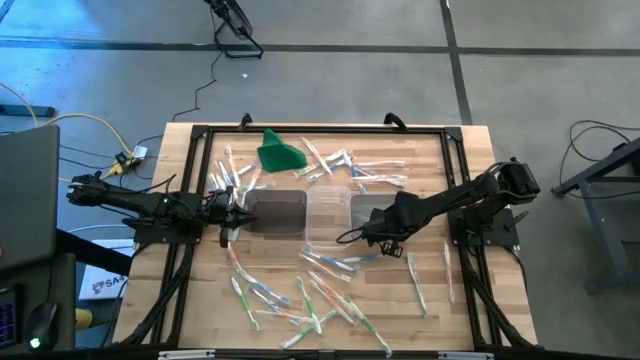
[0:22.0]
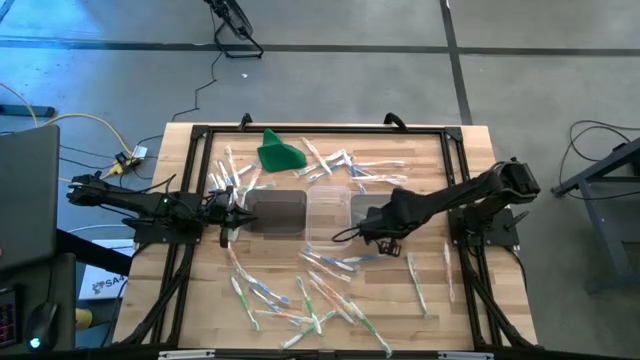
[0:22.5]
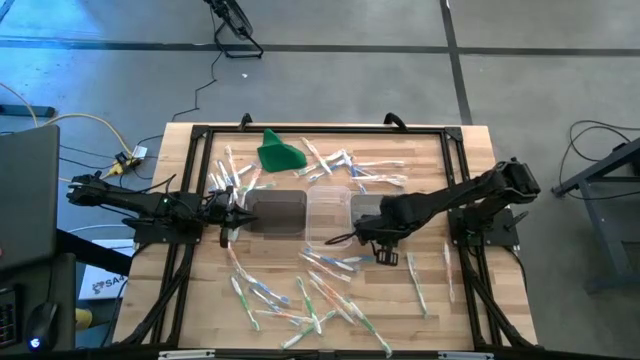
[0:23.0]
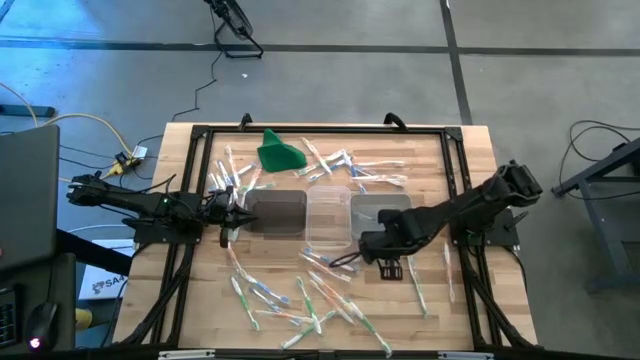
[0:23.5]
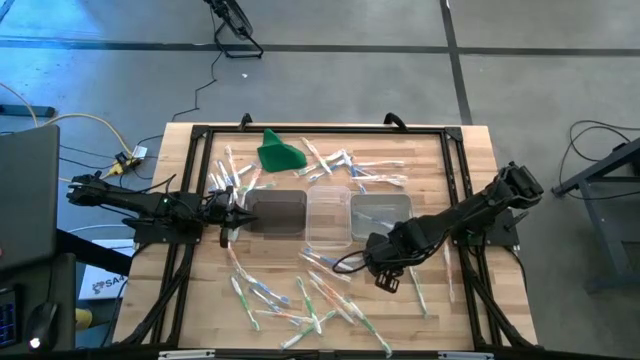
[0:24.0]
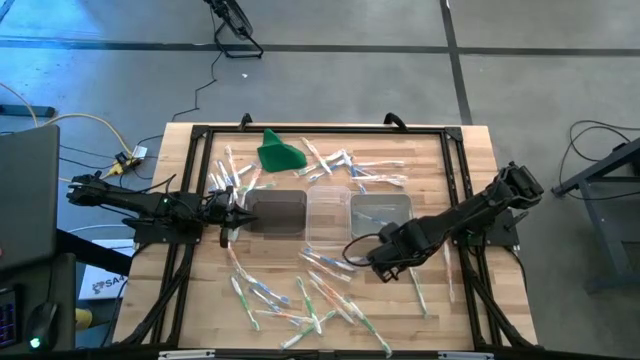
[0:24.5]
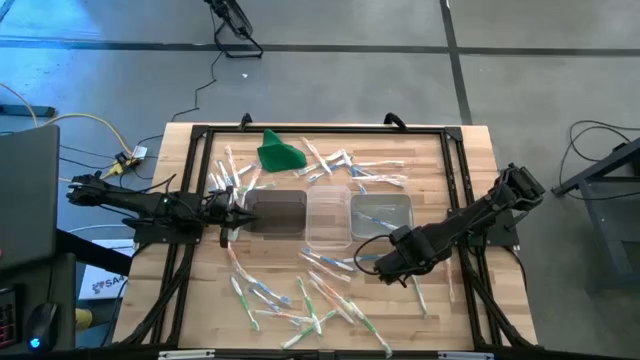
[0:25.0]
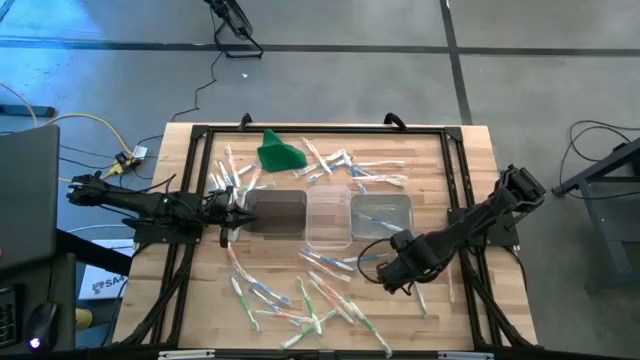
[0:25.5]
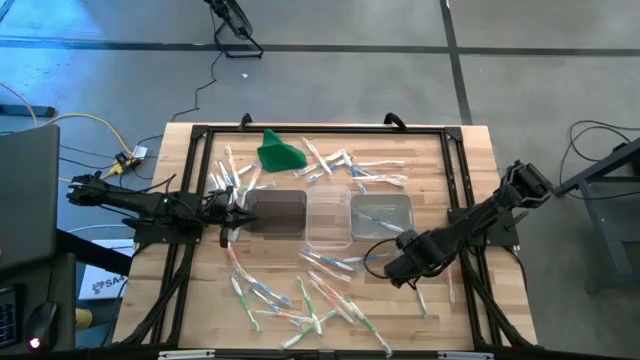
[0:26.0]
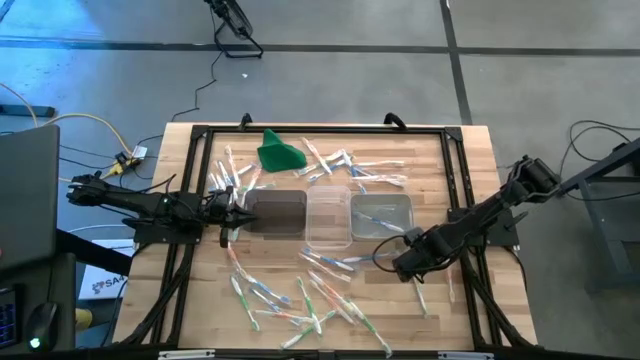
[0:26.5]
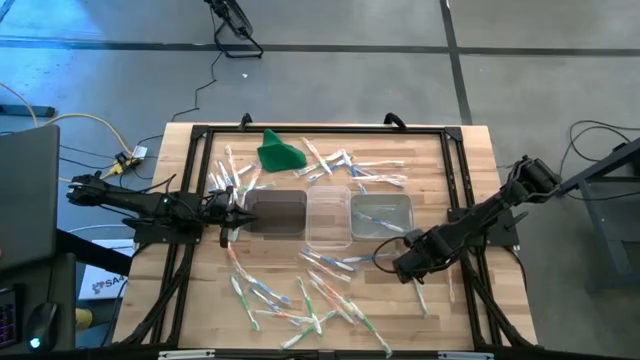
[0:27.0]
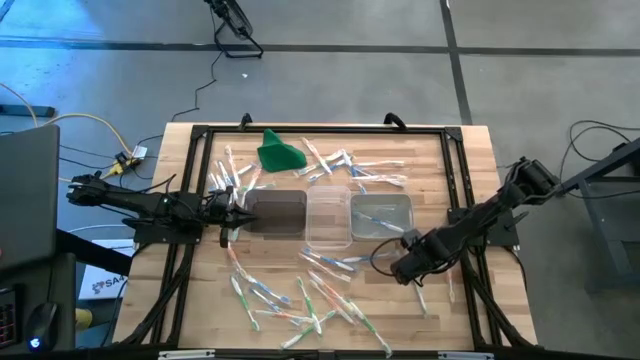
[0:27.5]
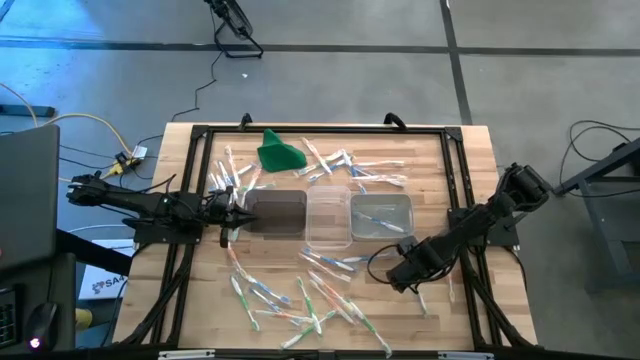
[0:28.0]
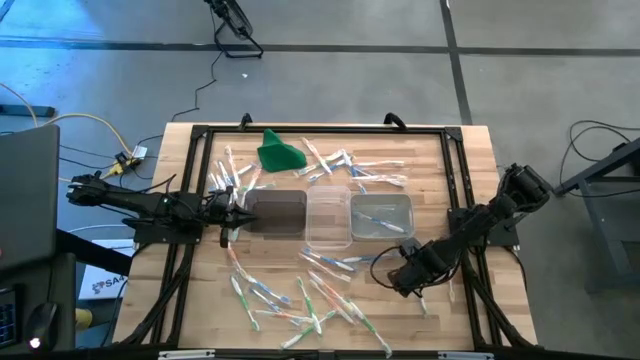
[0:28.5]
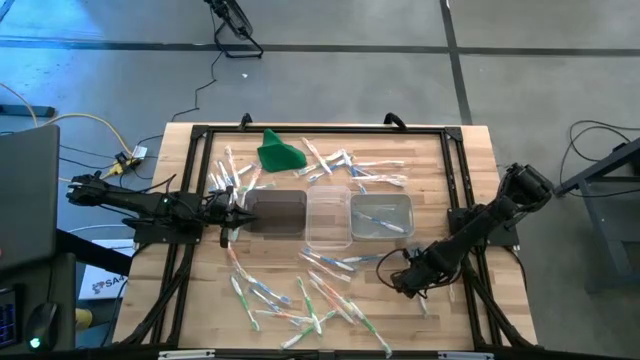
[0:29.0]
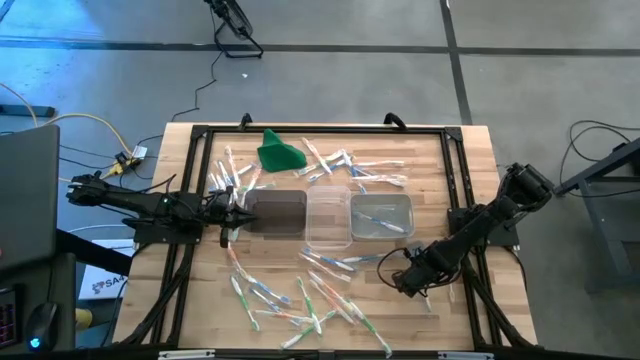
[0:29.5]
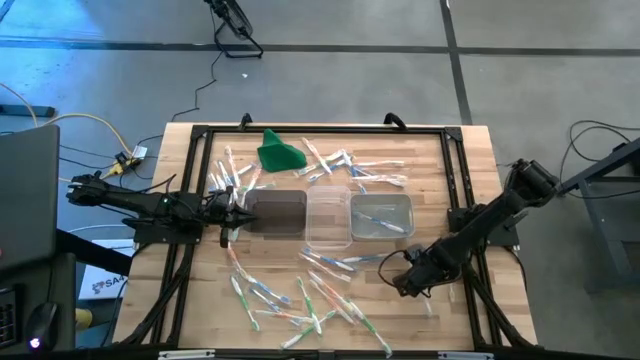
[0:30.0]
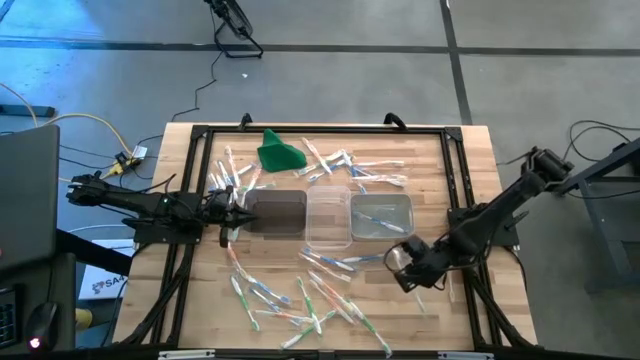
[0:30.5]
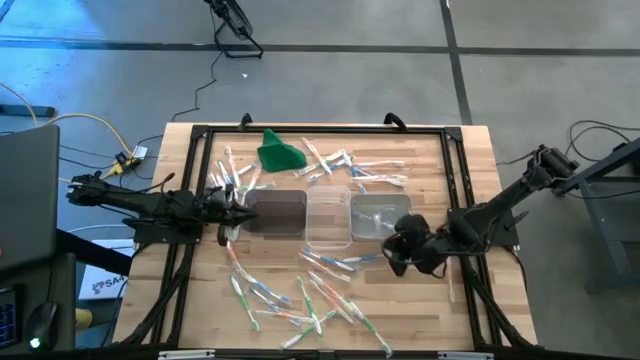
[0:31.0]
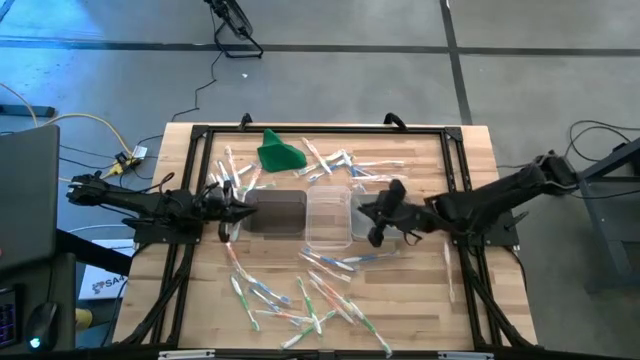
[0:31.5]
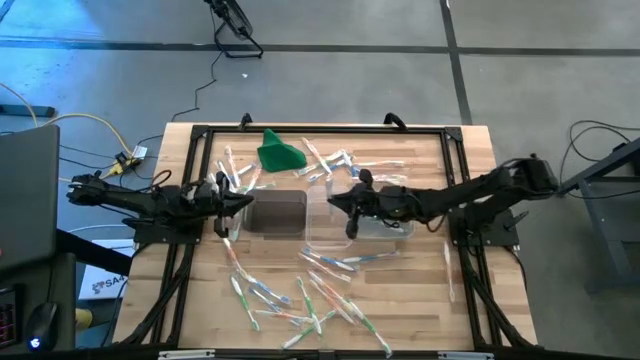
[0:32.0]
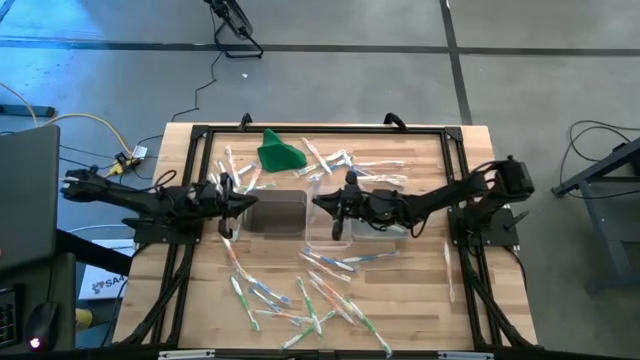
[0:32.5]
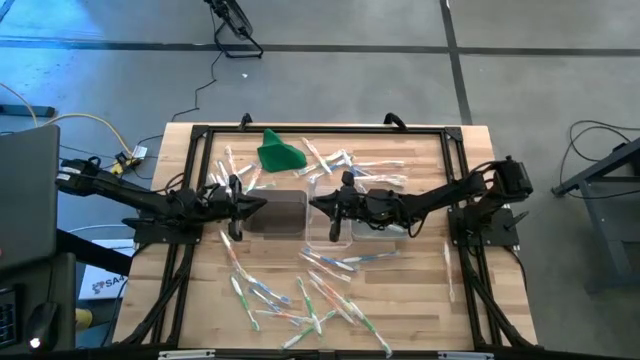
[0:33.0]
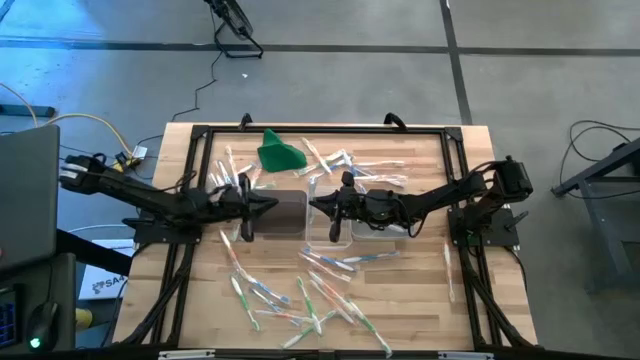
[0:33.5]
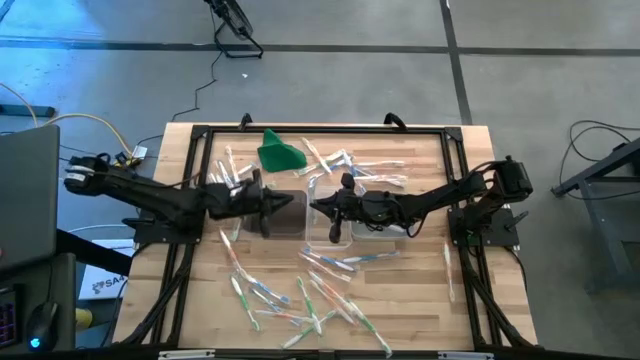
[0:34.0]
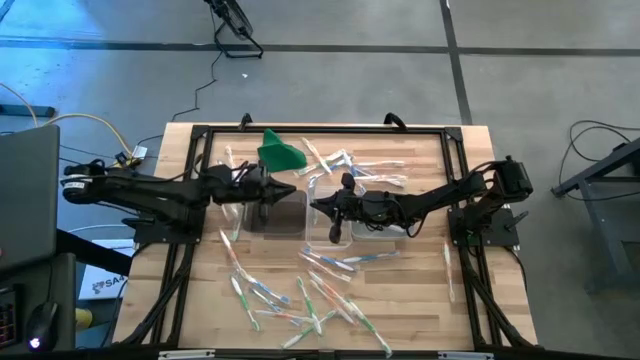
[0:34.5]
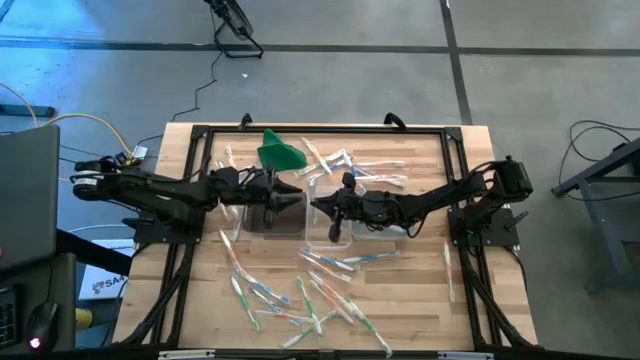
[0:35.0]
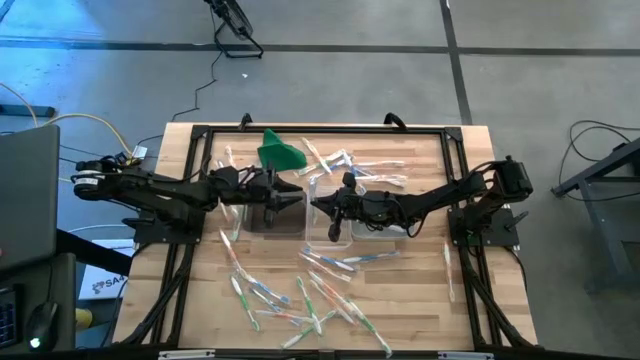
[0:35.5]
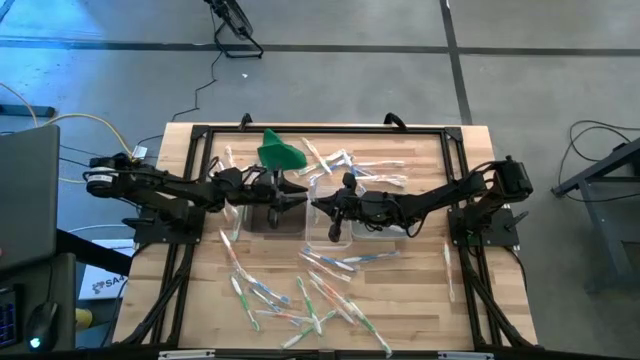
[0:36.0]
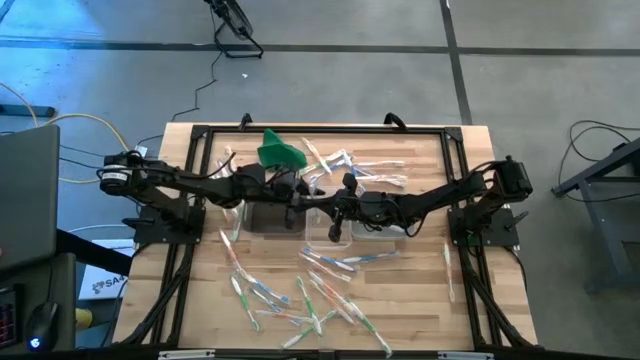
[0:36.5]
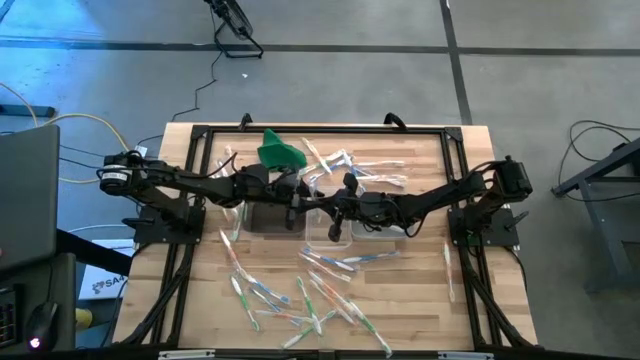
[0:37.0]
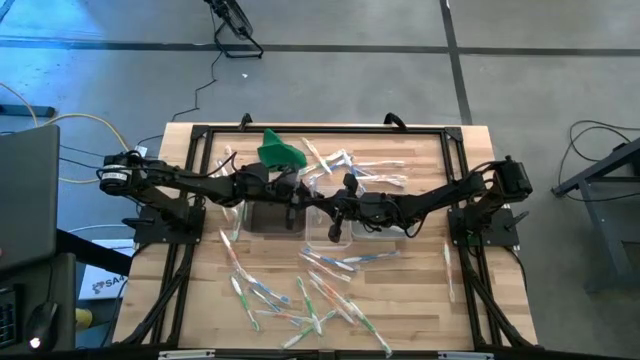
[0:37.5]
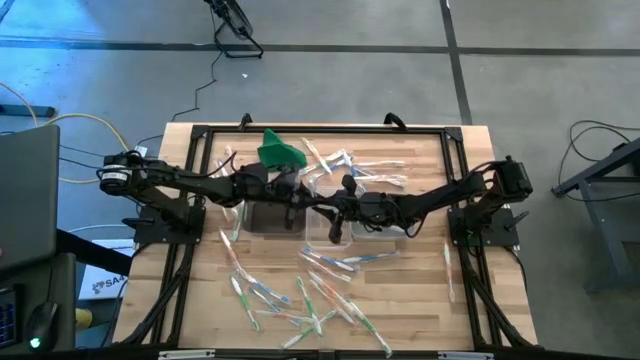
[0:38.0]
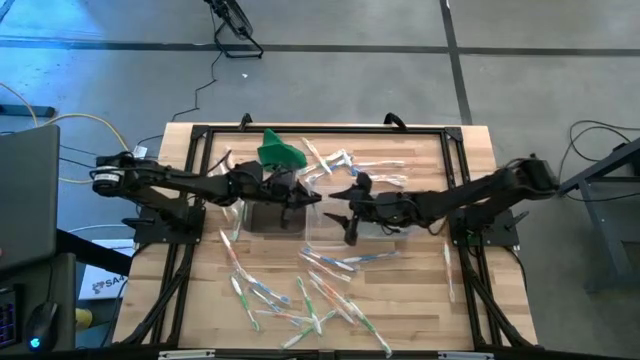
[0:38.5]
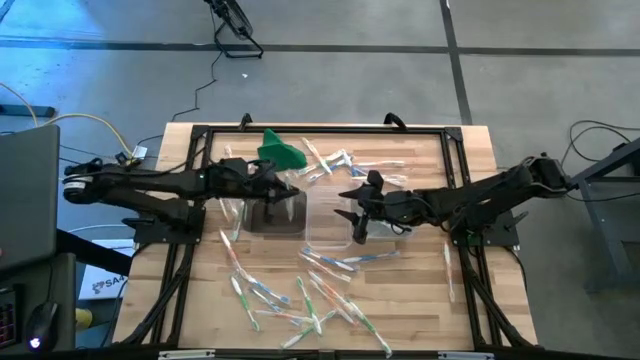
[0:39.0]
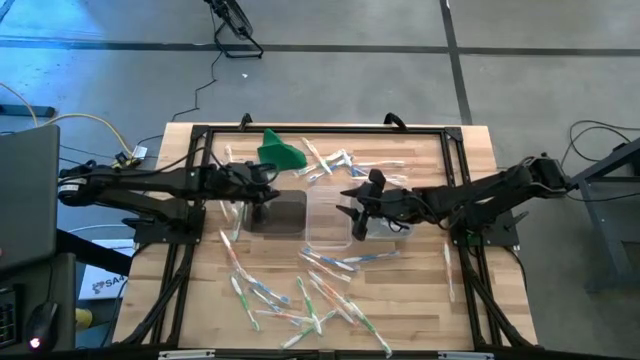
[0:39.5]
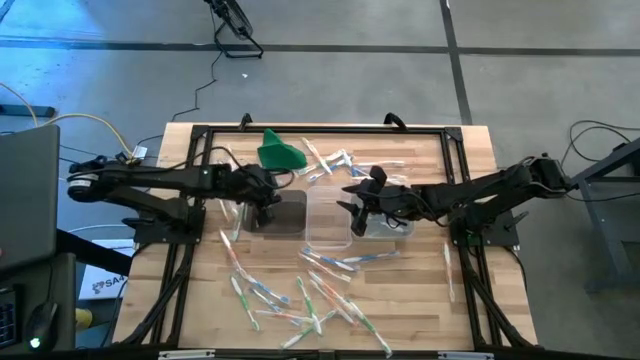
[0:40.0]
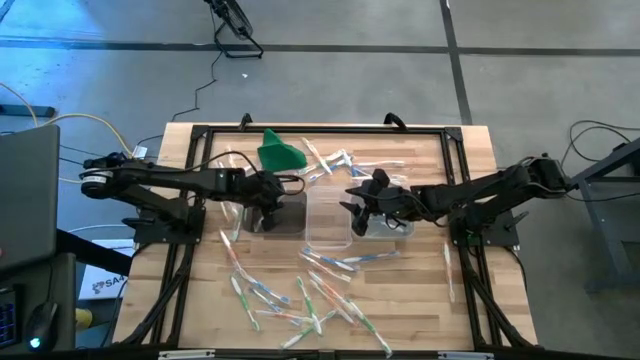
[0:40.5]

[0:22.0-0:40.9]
Task: Pick & Place Toothbrushes
Put the green toothbrush into the black bin
